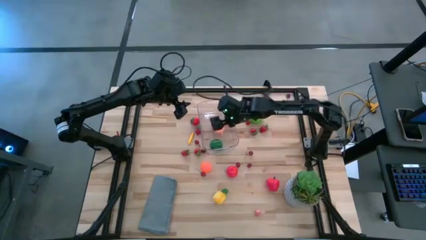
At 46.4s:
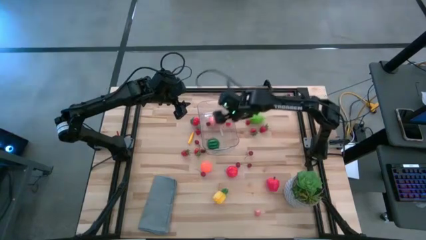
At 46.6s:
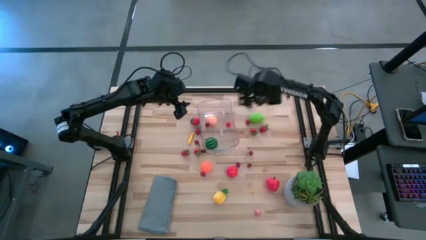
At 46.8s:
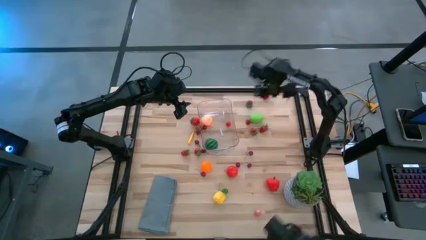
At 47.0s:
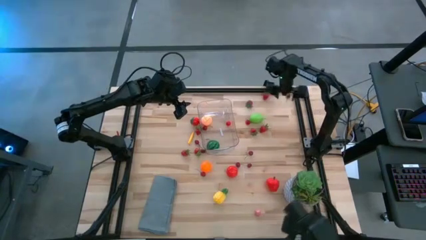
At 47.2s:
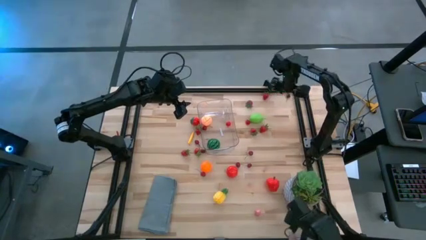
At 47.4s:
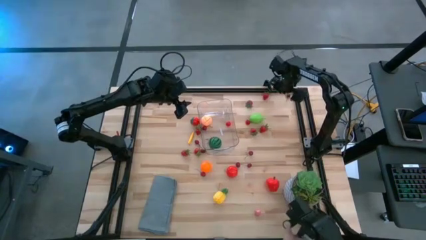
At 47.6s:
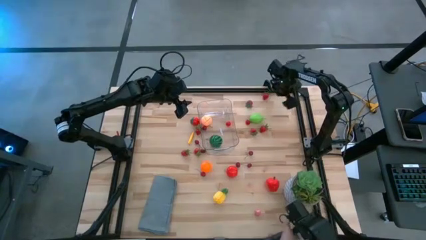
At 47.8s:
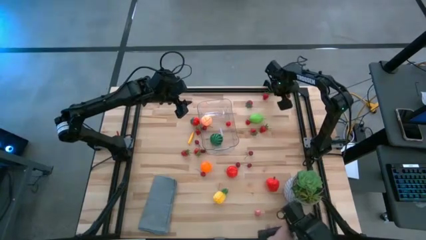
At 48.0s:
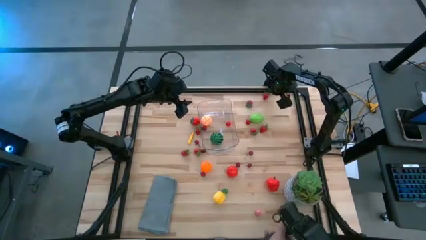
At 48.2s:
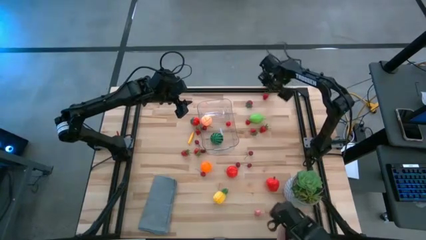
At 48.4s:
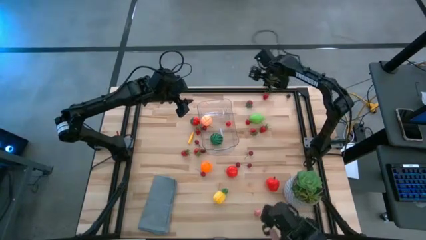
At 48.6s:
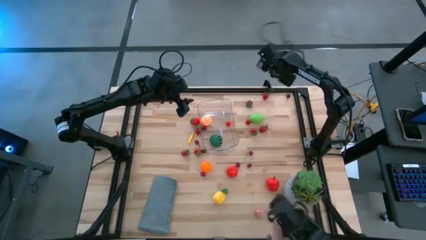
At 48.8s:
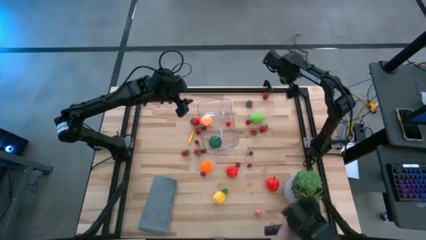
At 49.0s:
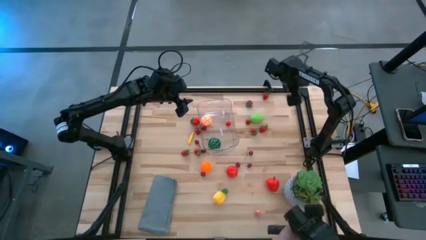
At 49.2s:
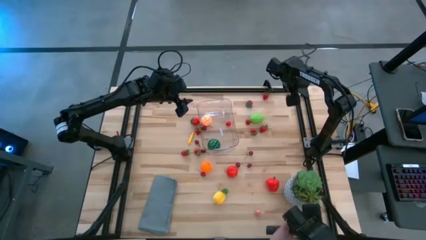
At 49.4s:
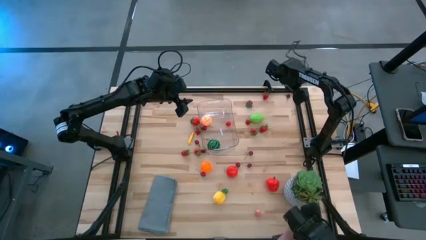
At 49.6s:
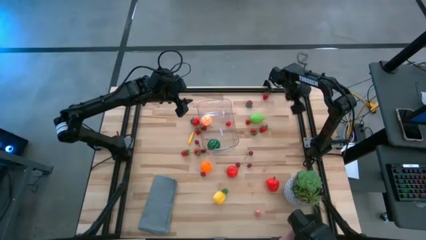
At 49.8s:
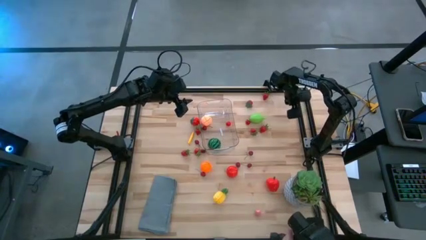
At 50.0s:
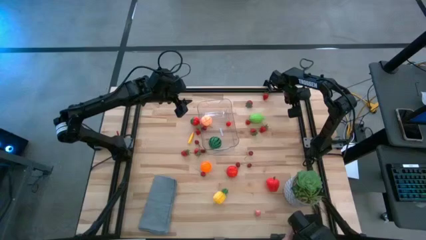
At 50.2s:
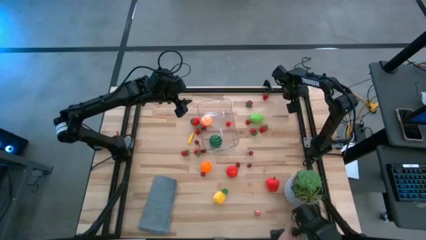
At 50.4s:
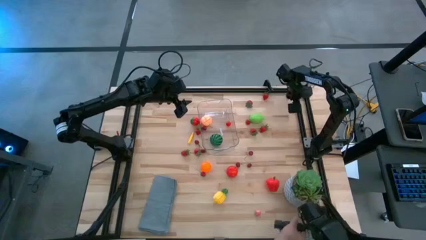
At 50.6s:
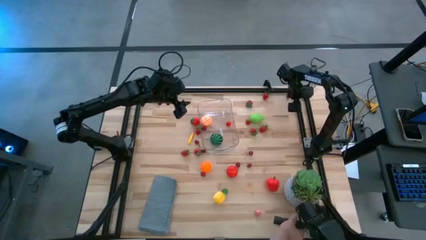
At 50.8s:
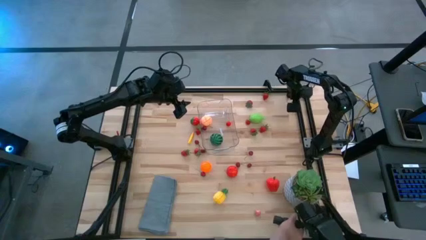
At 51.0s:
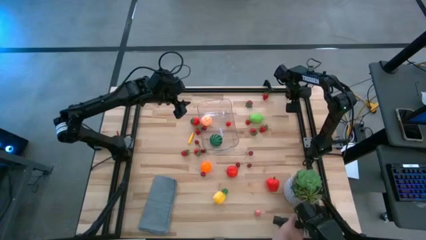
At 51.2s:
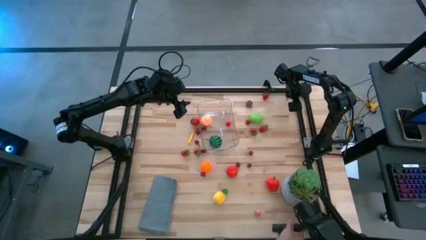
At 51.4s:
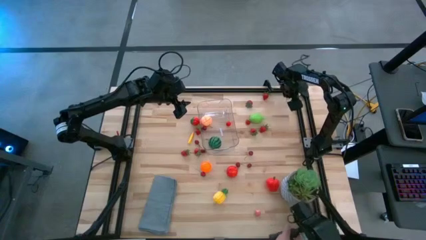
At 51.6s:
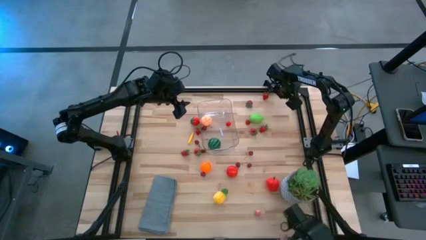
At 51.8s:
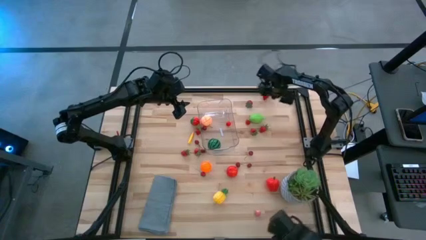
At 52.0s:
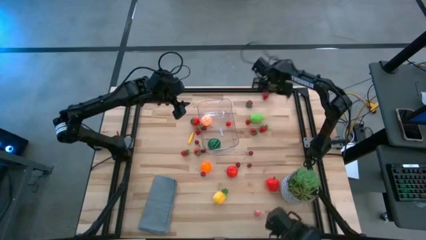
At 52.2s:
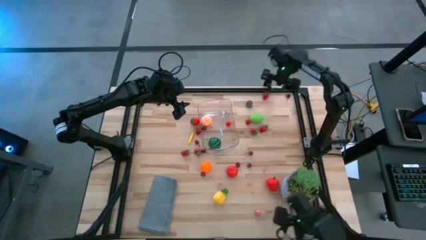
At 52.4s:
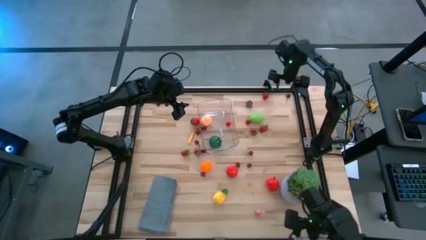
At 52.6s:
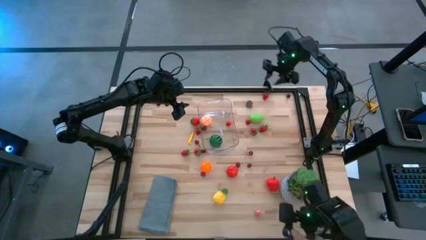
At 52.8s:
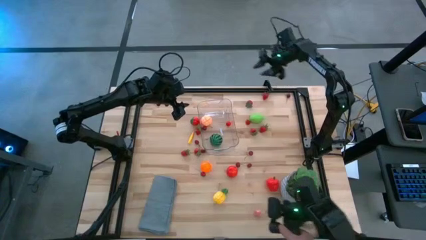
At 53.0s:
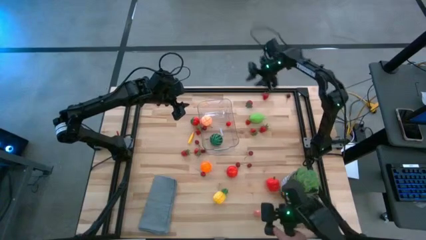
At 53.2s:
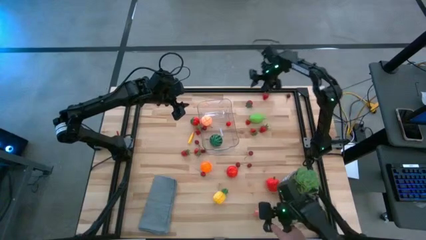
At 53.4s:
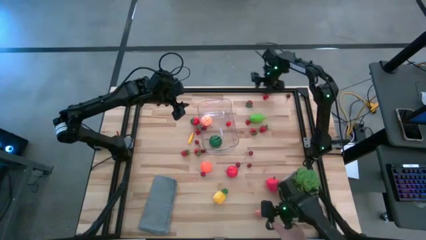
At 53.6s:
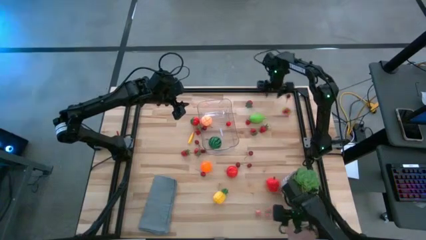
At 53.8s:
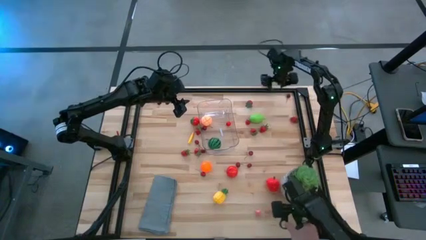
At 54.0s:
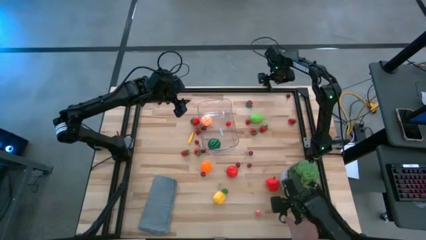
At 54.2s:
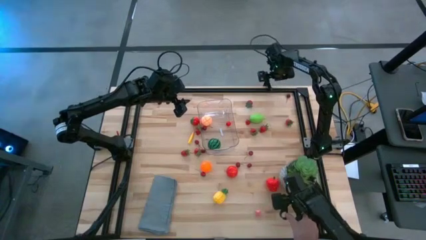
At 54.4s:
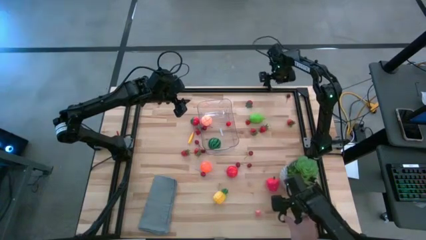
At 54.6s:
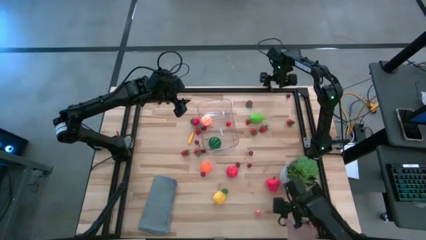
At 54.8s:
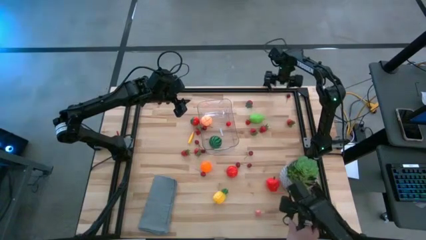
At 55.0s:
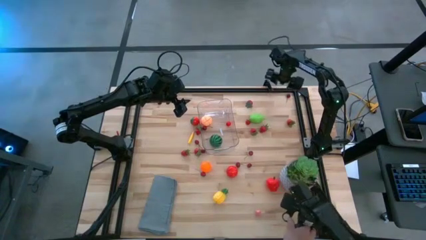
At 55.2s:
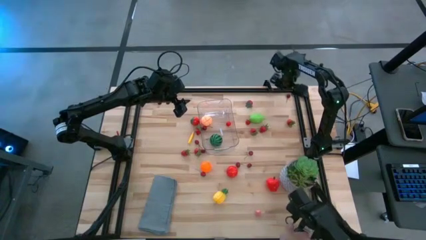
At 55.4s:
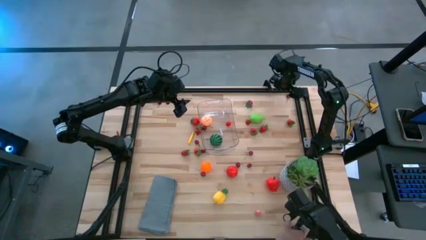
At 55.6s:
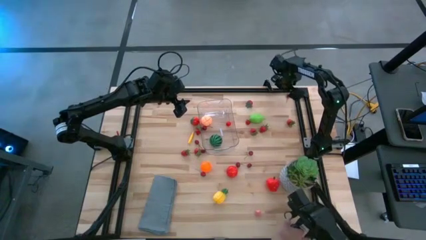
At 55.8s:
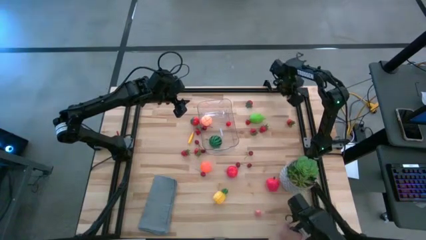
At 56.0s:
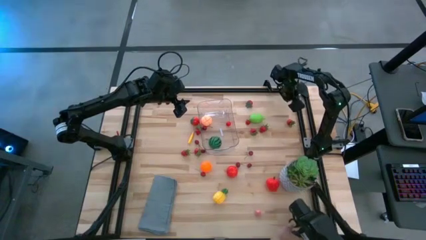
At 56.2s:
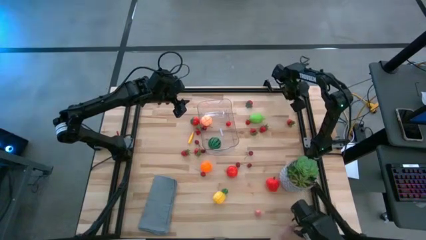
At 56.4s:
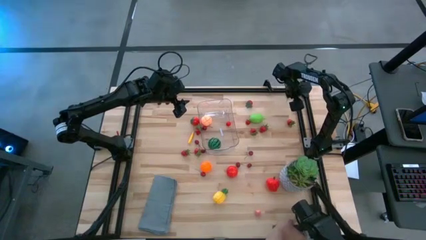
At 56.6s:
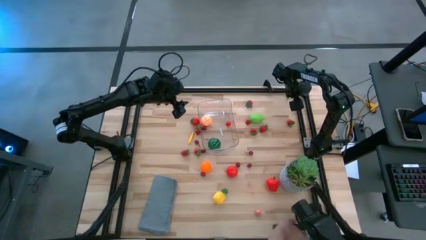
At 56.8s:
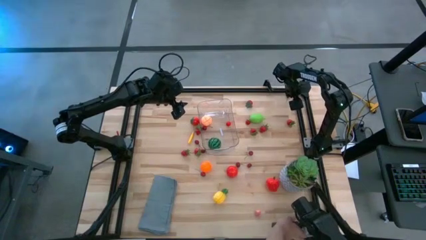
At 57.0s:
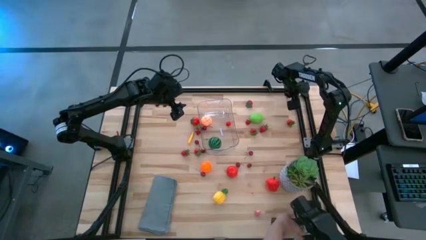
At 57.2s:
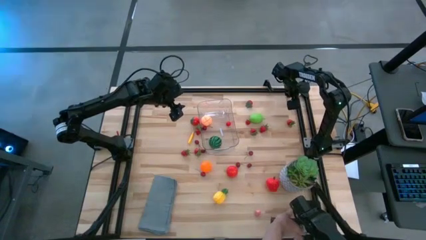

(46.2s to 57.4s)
Task: Pick and placing Produce into tupperware
Put the red cherry into the transparent container

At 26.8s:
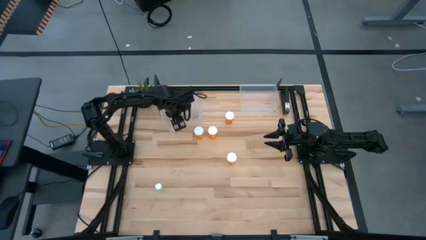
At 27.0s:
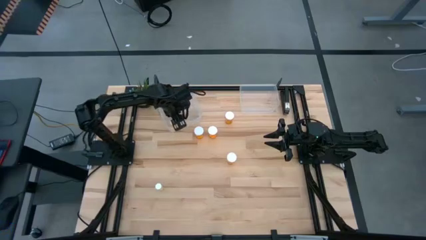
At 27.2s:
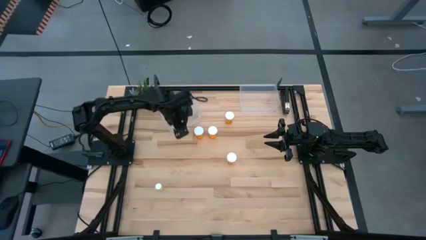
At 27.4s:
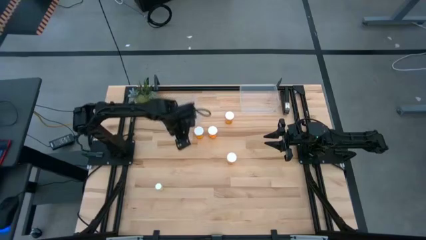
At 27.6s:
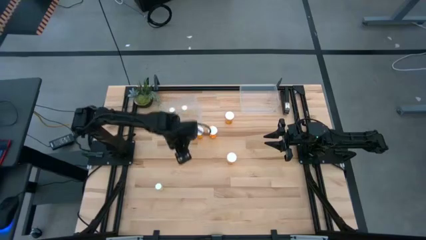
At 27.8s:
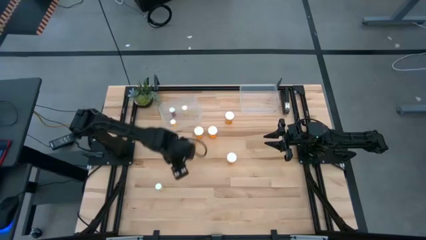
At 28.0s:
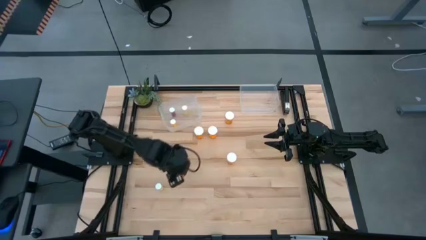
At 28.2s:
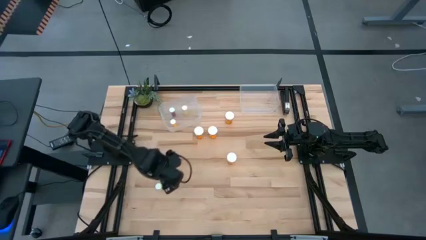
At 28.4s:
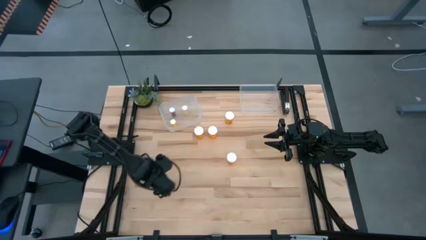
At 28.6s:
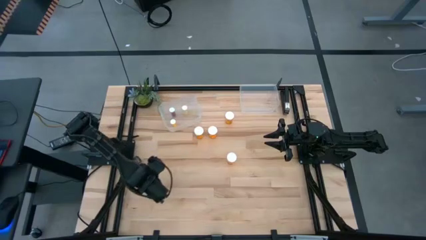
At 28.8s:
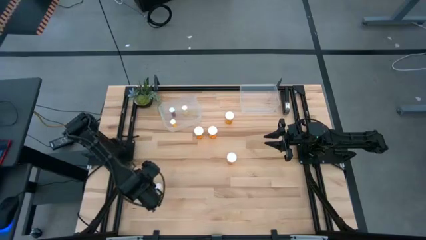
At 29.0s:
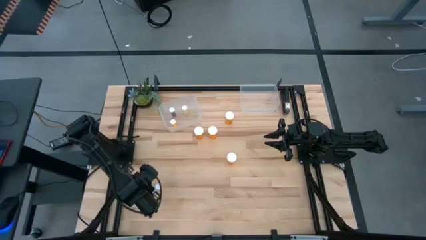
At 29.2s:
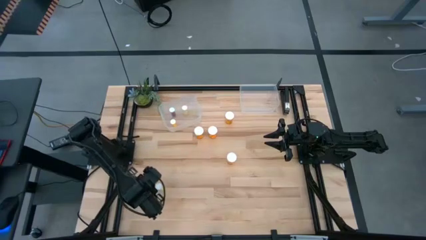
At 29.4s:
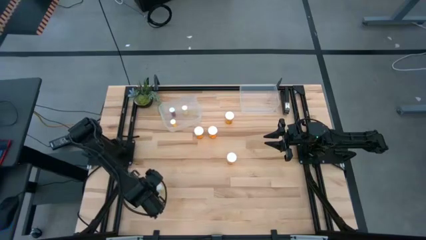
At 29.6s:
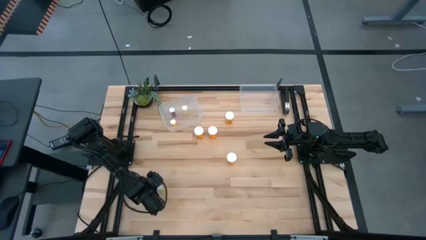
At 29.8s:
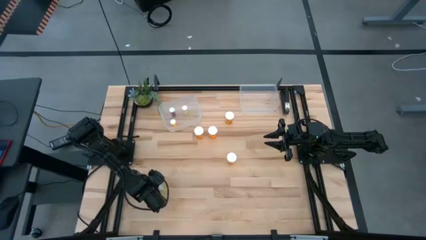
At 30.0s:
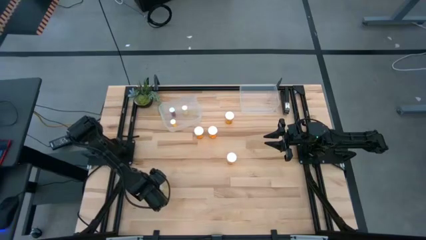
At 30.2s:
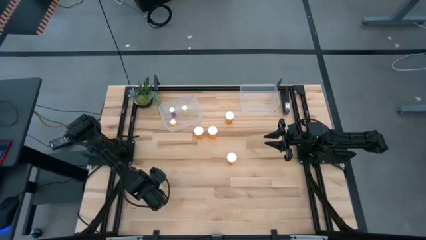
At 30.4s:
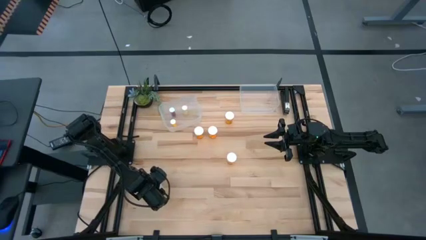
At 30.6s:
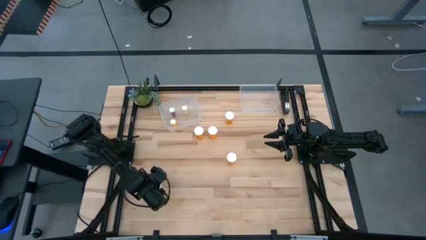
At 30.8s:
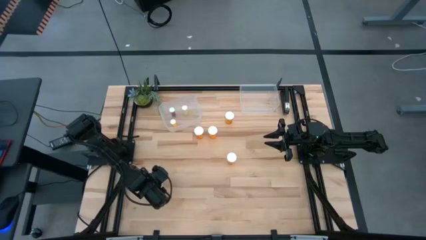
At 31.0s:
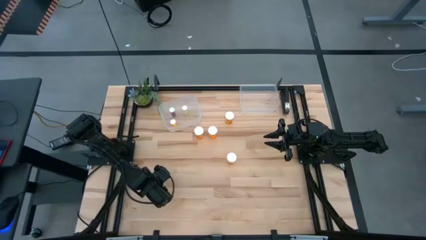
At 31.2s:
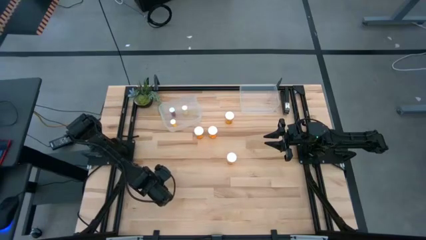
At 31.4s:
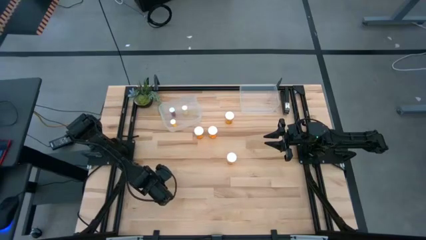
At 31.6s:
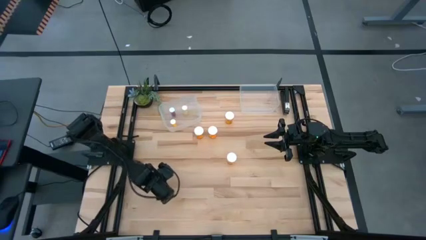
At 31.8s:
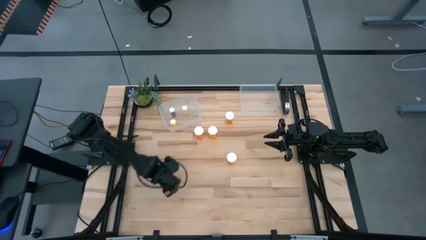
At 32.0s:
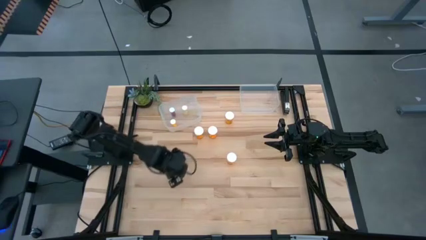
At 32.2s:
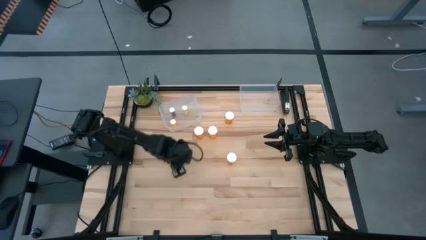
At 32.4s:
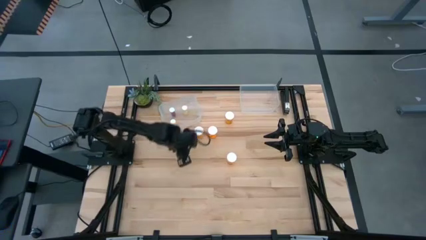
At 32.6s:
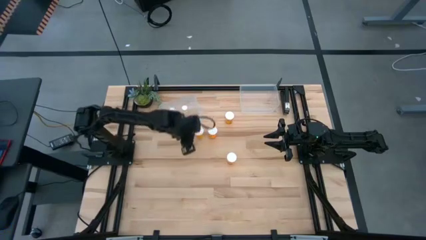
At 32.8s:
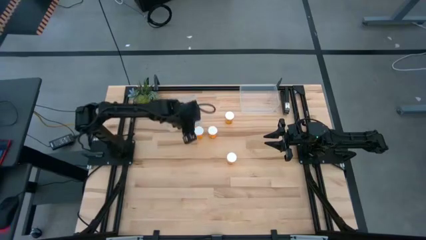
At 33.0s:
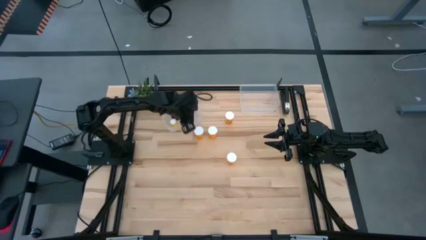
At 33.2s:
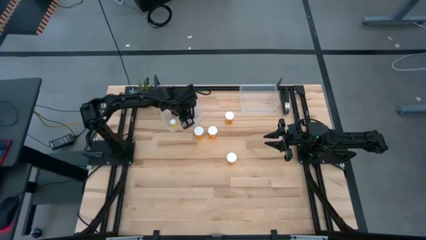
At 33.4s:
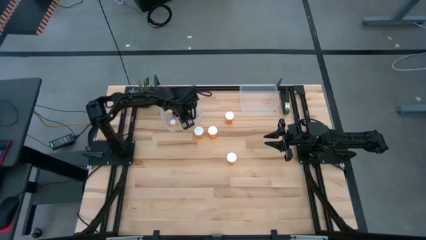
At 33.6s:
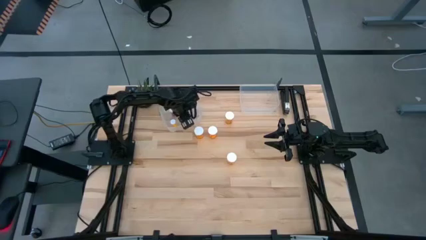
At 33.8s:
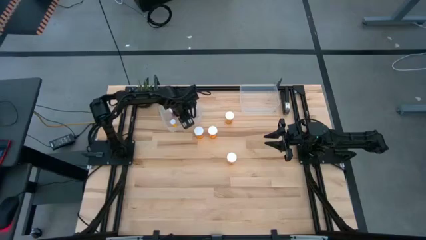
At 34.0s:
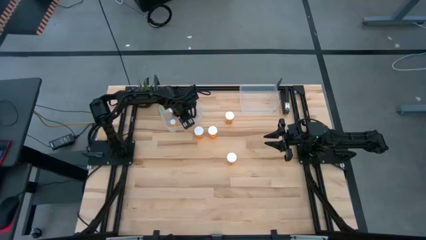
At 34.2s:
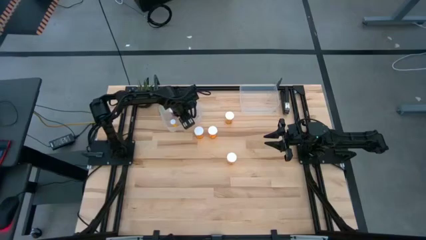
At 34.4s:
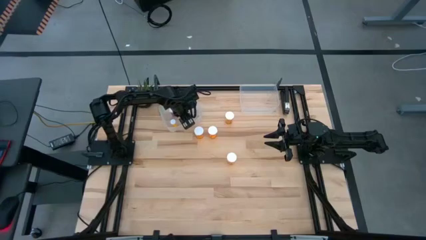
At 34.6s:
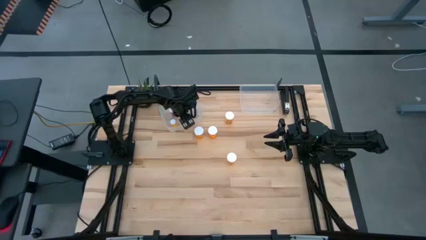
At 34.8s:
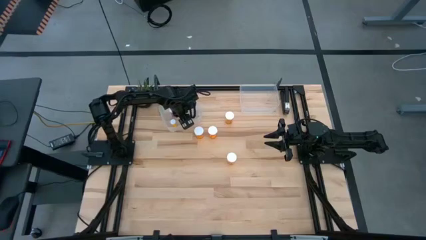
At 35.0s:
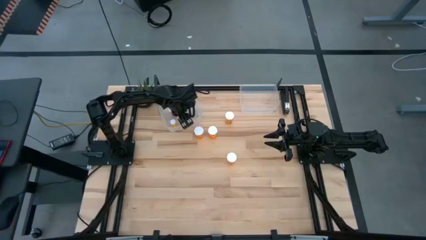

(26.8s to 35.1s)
Task: Pick and place medicine bottles into bin by pill shape (circle, oval)
Put the yellow small pill bottle into the left transparent bin
